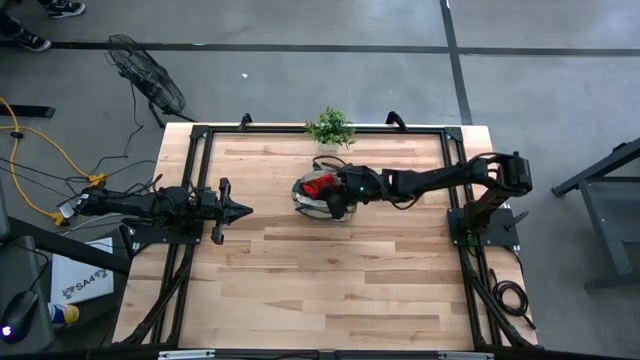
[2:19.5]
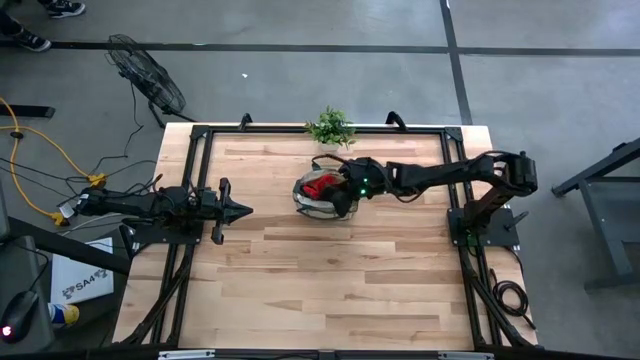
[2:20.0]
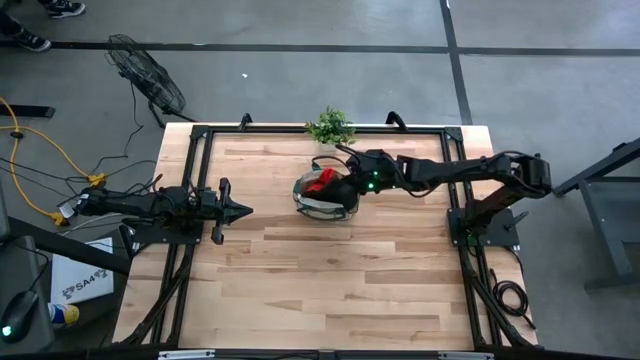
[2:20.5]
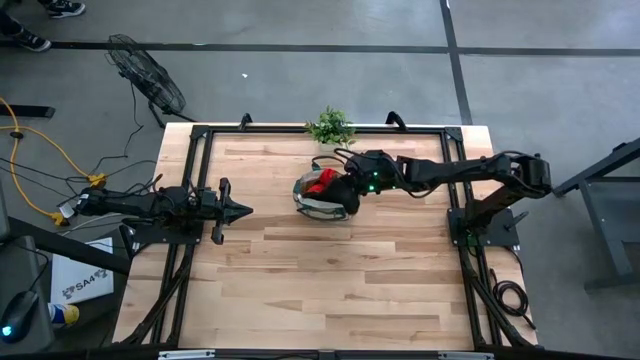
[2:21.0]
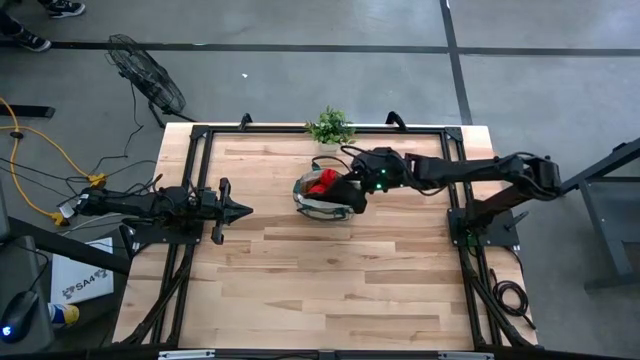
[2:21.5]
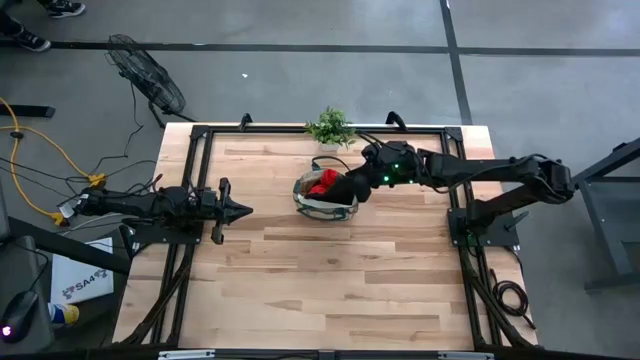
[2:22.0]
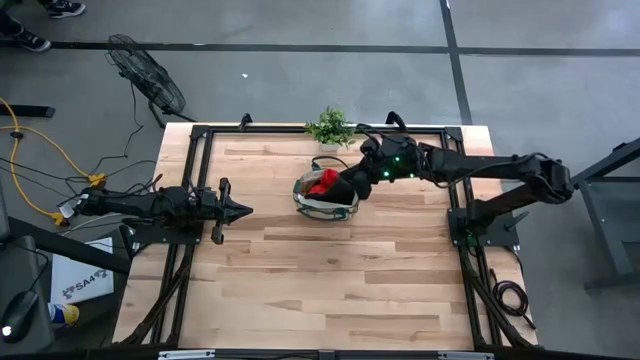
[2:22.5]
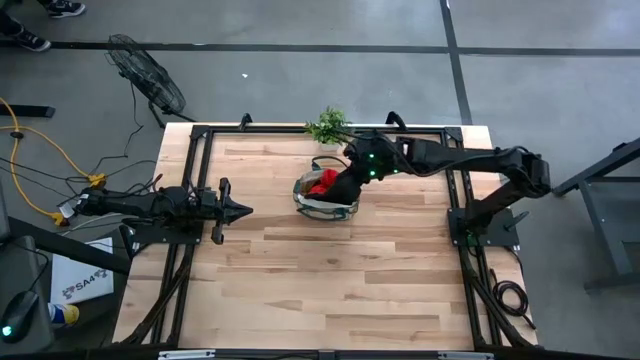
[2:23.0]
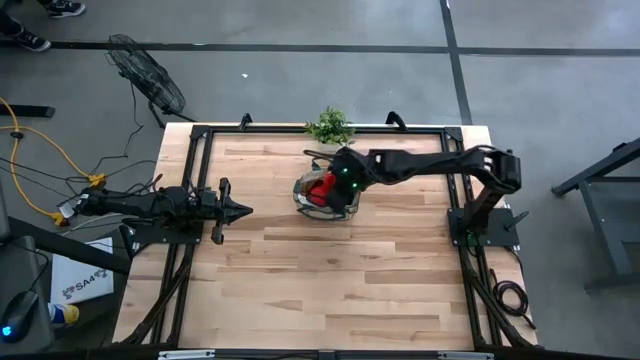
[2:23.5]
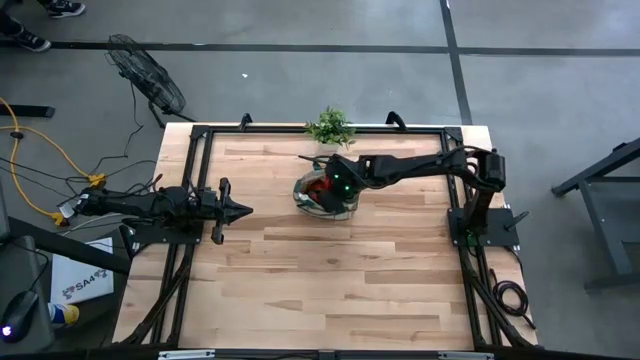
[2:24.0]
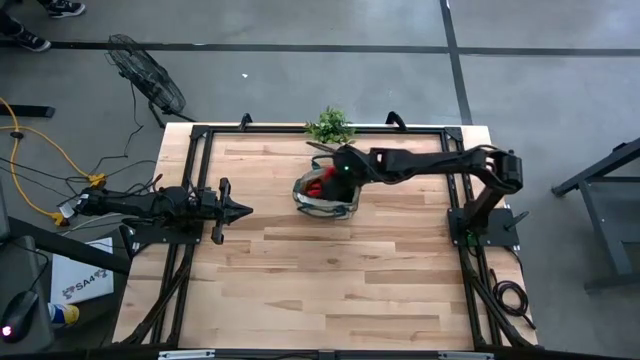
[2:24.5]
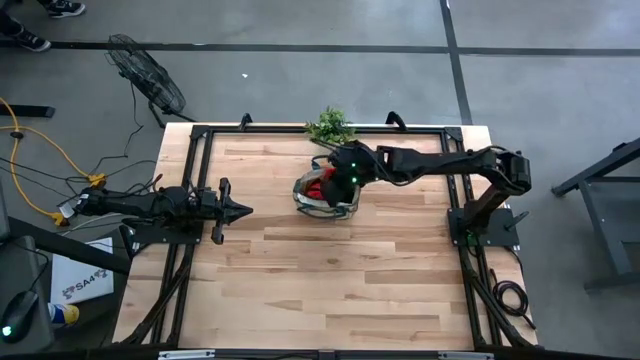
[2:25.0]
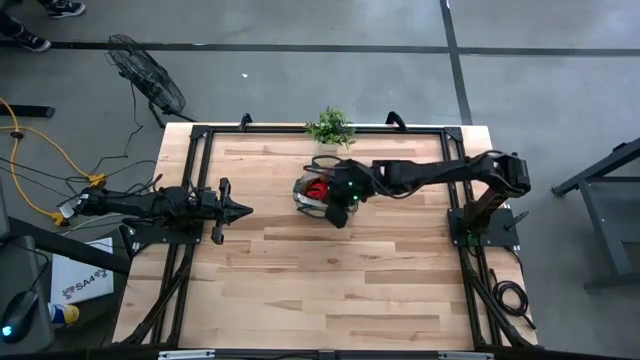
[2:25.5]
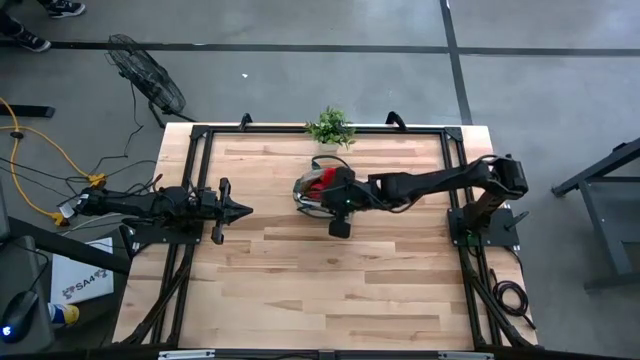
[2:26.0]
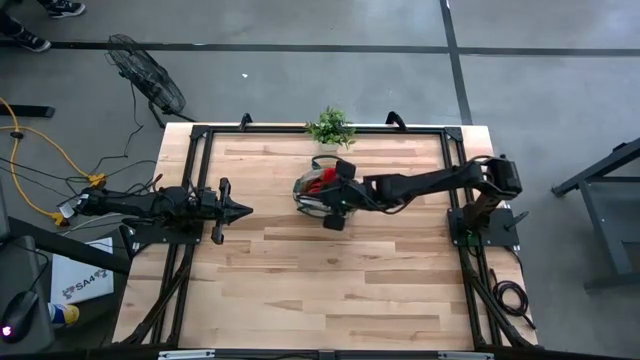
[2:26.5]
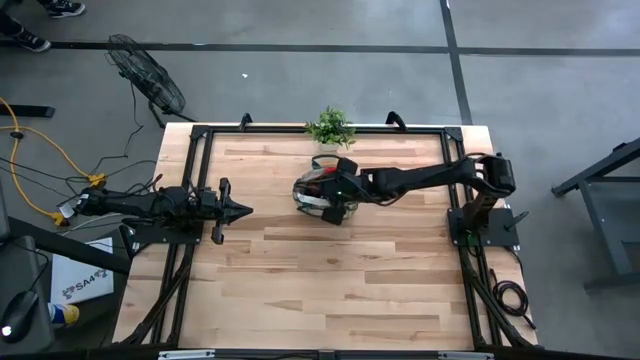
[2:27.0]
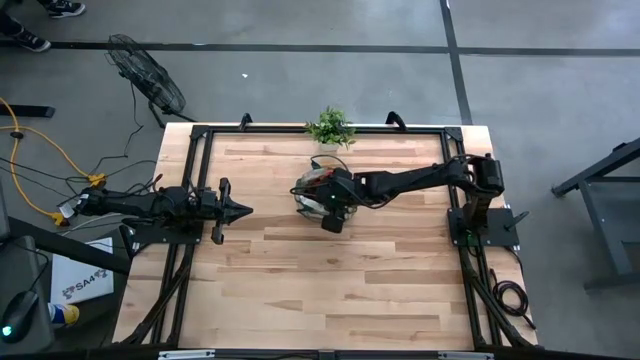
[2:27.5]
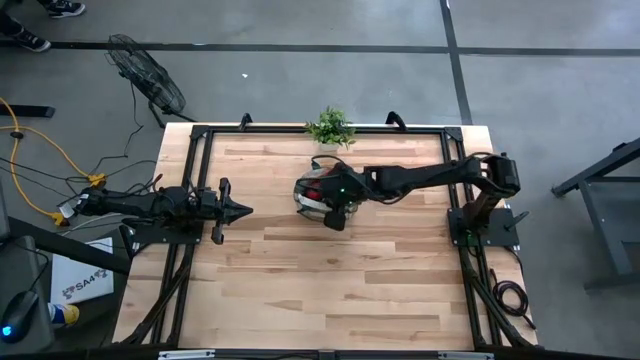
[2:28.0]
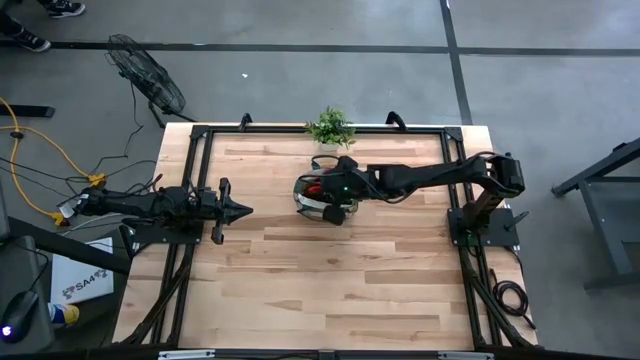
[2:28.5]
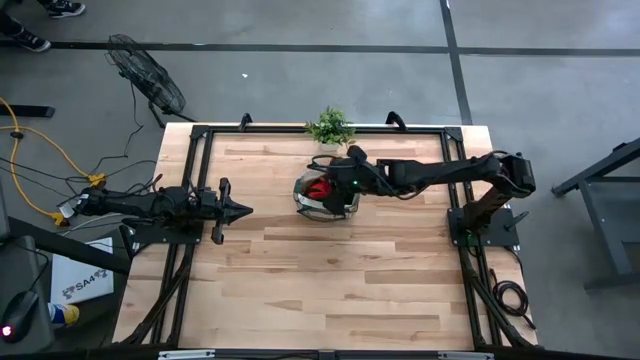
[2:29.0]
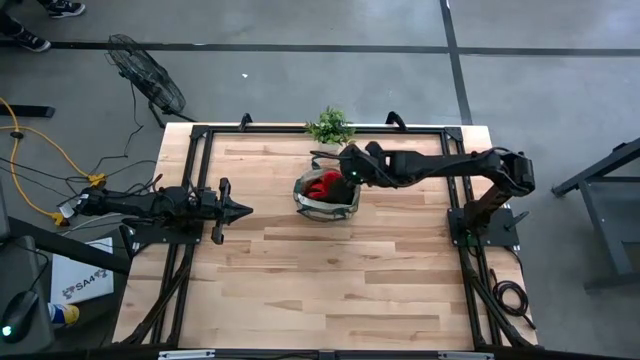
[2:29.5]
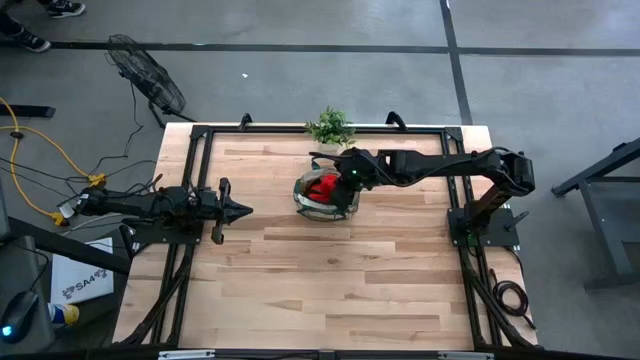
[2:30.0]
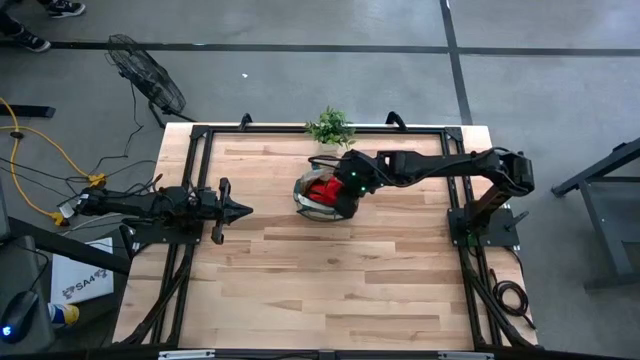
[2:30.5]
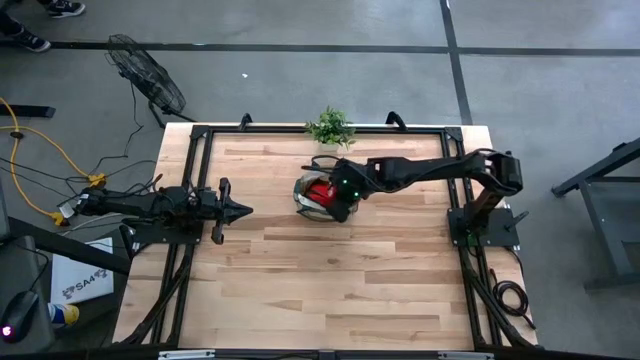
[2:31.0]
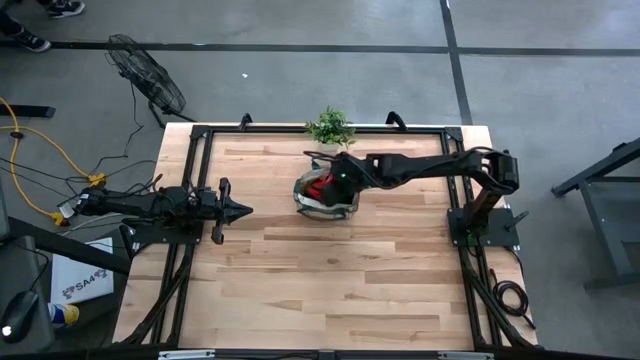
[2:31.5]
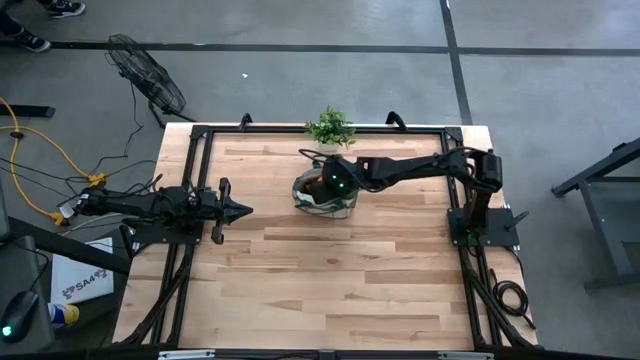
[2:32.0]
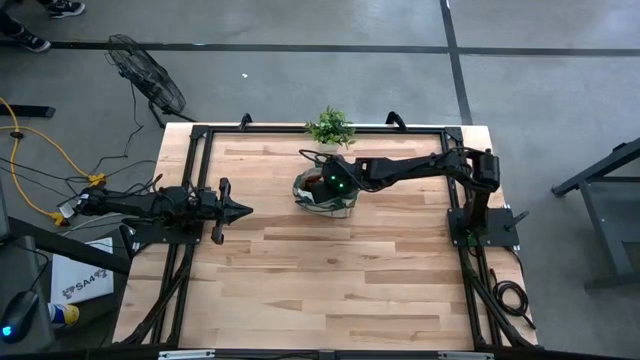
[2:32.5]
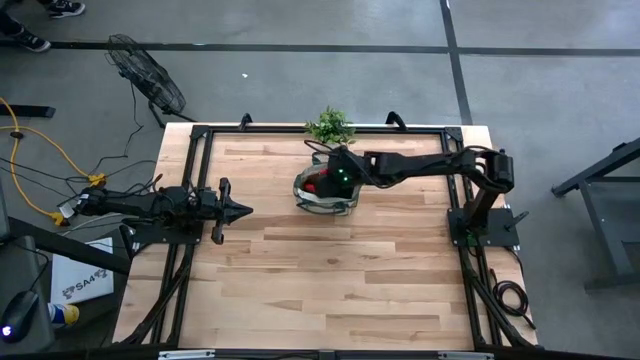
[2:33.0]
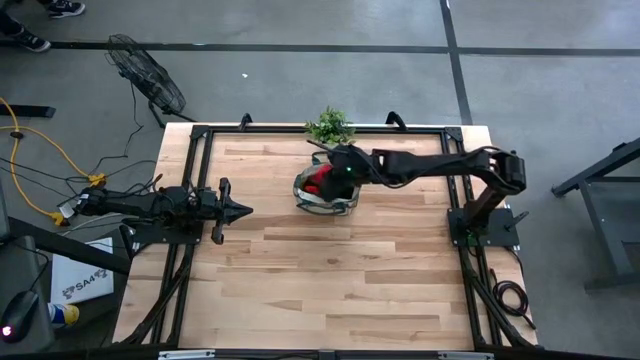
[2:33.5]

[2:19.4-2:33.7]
Task: Pick & Place Garden tools in Gardening bag
Put the red glove into the gardening bag

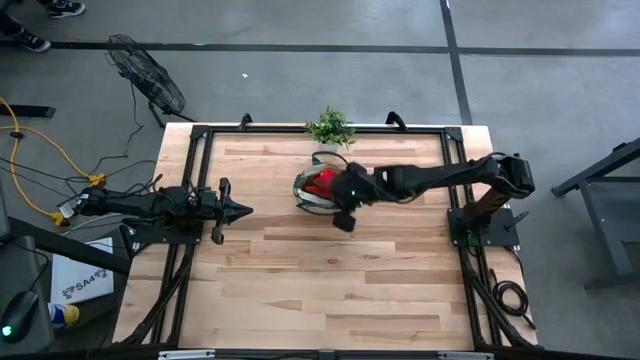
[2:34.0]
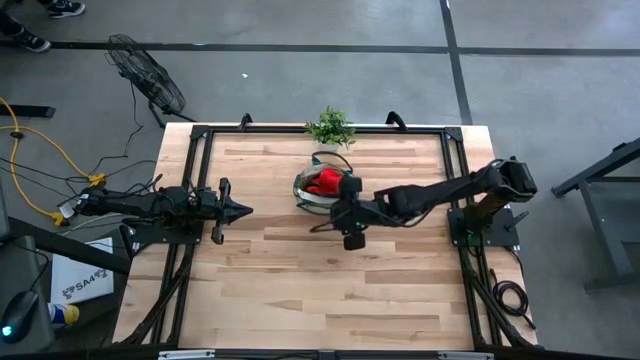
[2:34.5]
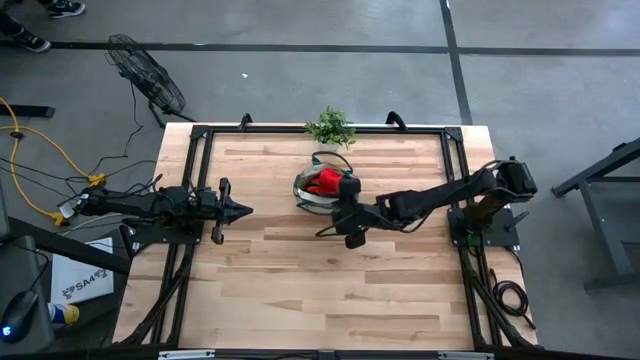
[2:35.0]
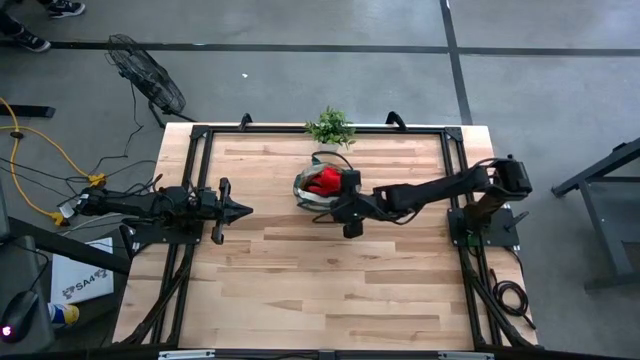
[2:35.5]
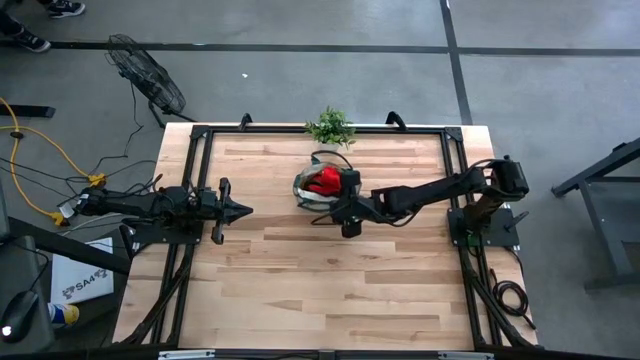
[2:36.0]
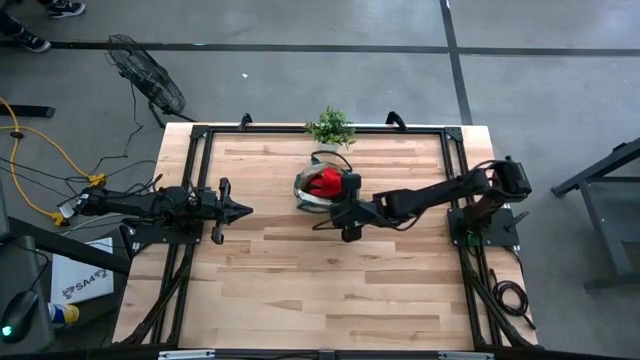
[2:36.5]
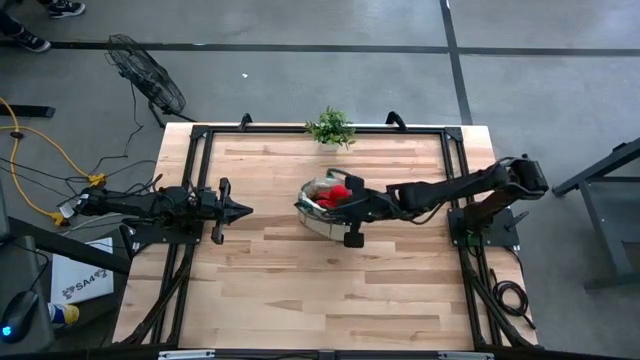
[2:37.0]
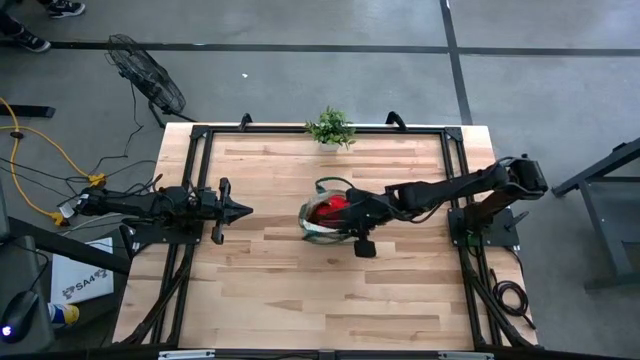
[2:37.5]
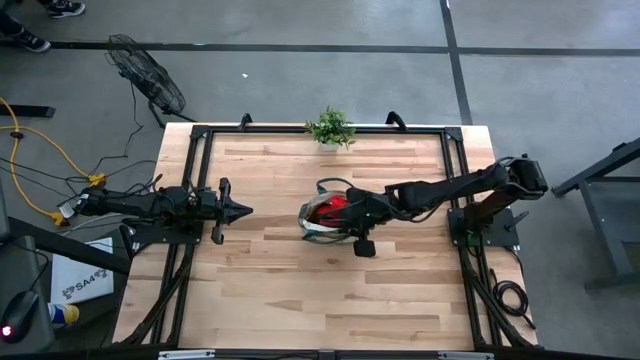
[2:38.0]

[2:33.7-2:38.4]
Move the gardening bag to the center of the table

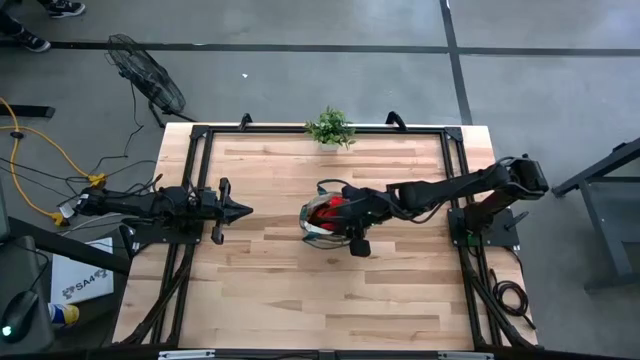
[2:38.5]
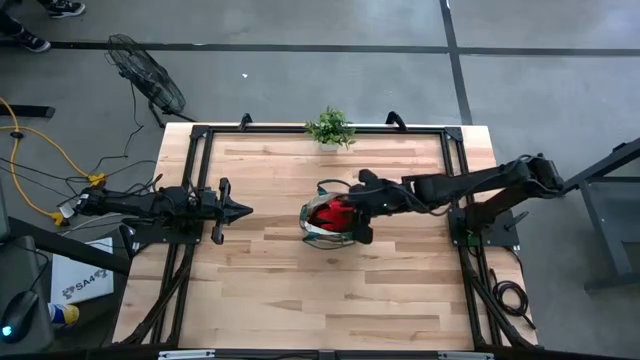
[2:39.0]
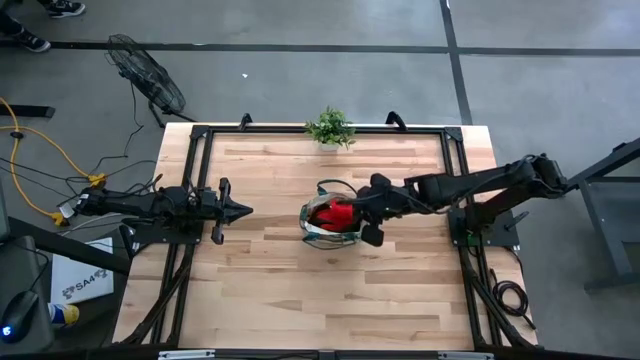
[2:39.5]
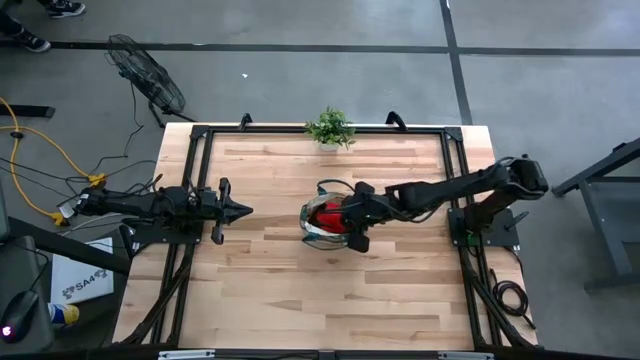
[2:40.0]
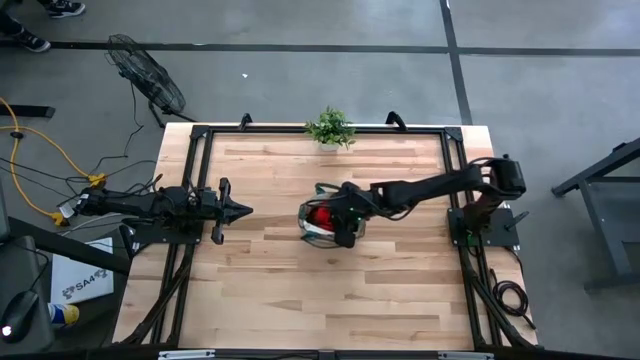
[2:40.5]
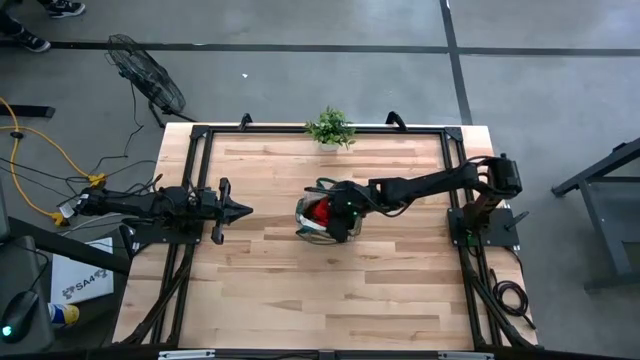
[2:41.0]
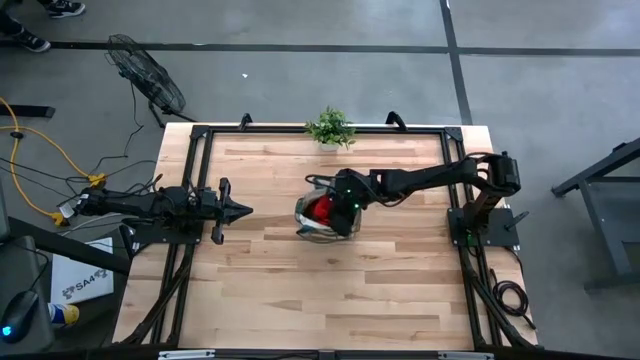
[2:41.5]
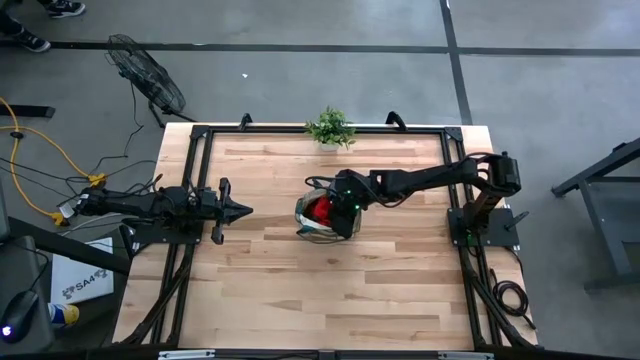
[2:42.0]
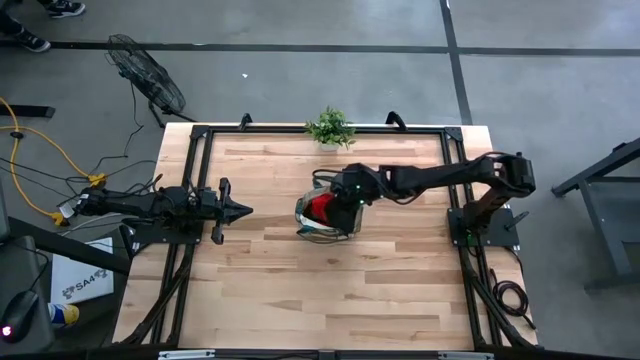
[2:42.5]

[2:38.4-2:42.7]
Adjust the red gloves in the gardening bag
